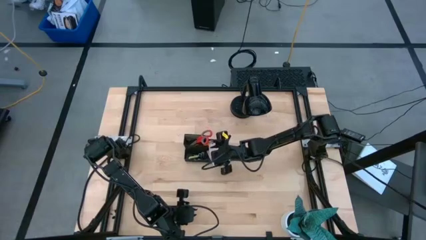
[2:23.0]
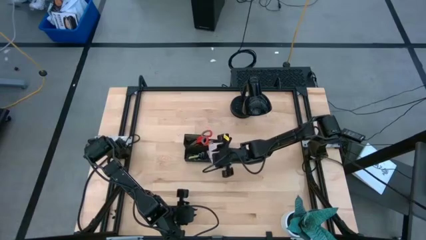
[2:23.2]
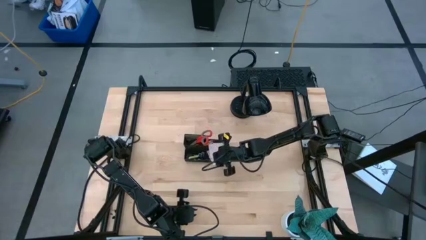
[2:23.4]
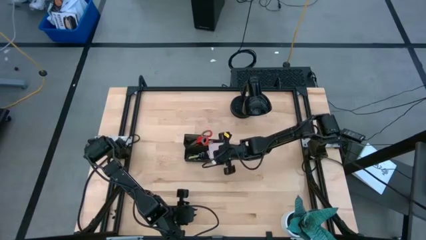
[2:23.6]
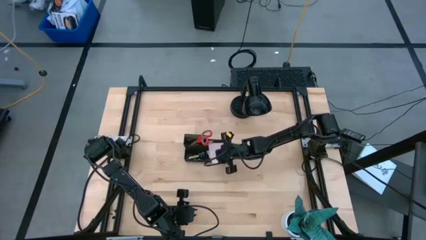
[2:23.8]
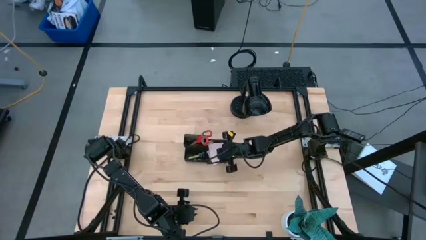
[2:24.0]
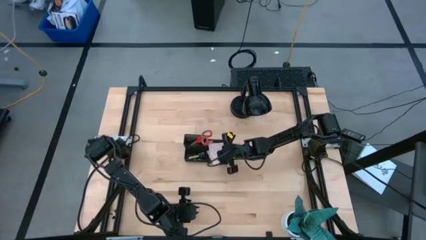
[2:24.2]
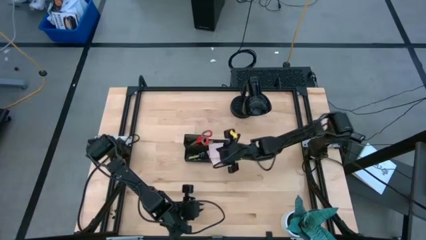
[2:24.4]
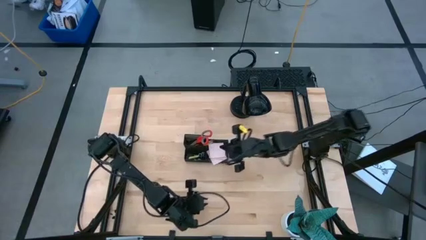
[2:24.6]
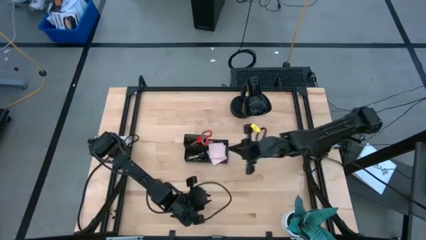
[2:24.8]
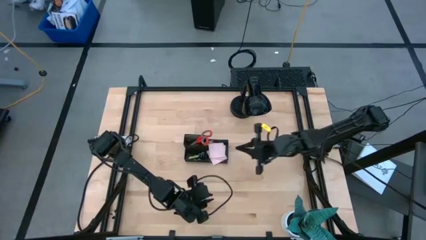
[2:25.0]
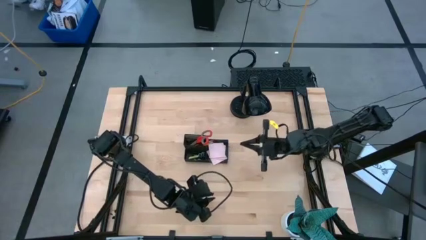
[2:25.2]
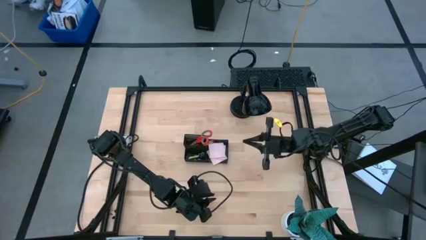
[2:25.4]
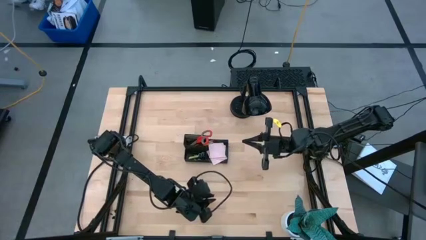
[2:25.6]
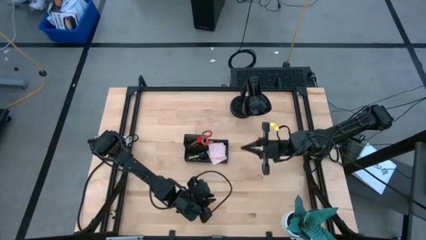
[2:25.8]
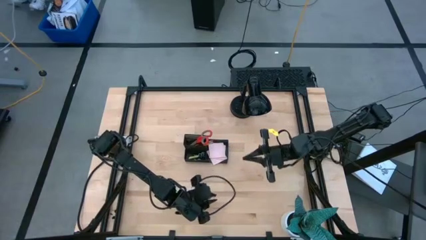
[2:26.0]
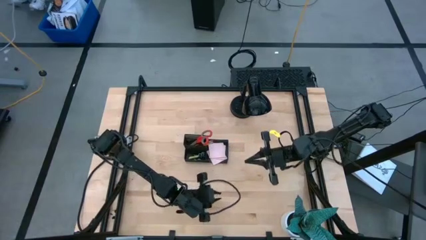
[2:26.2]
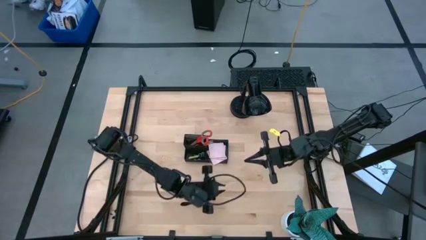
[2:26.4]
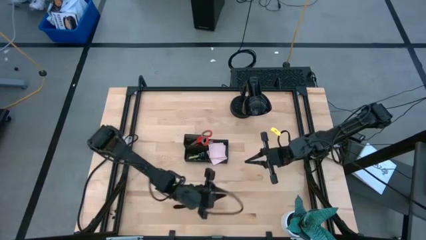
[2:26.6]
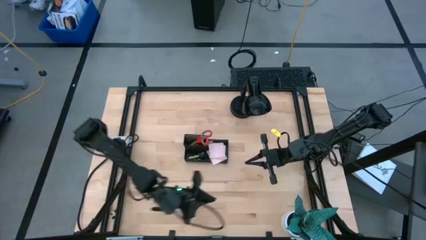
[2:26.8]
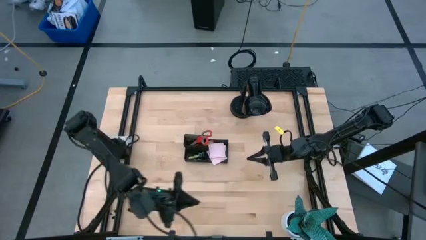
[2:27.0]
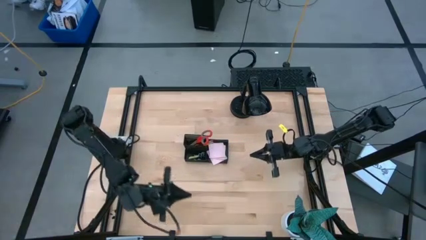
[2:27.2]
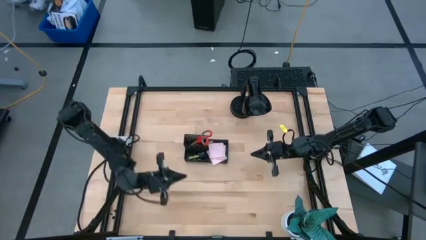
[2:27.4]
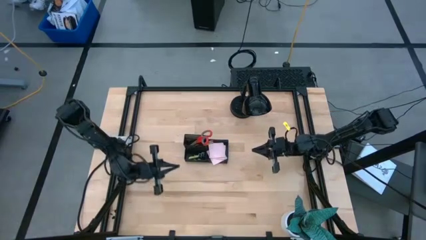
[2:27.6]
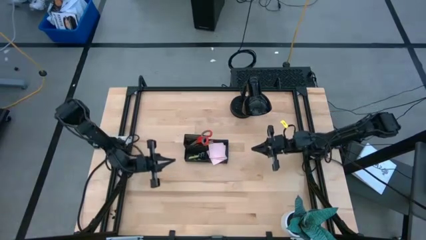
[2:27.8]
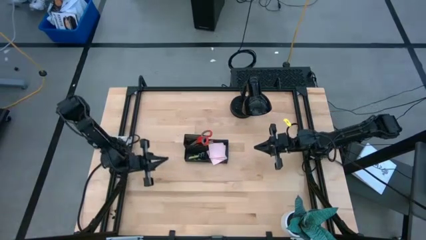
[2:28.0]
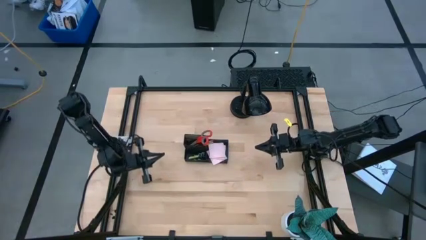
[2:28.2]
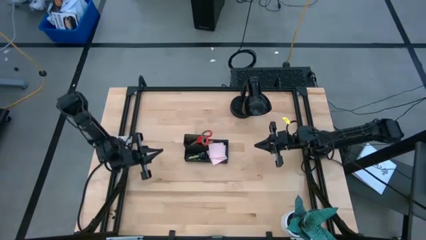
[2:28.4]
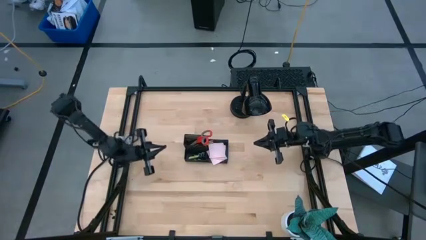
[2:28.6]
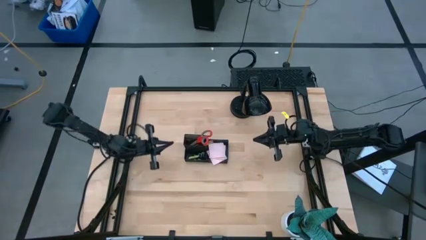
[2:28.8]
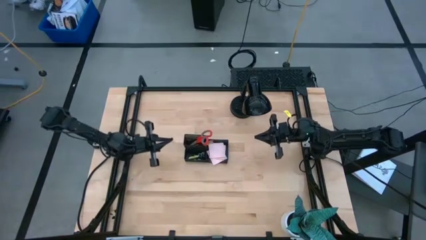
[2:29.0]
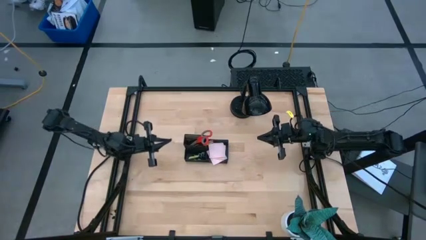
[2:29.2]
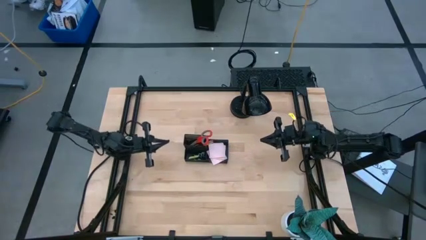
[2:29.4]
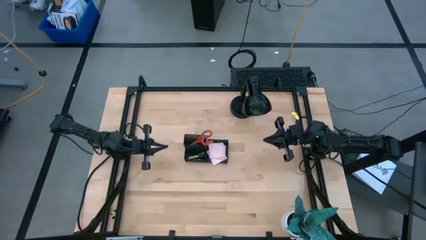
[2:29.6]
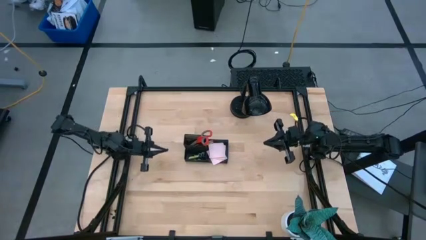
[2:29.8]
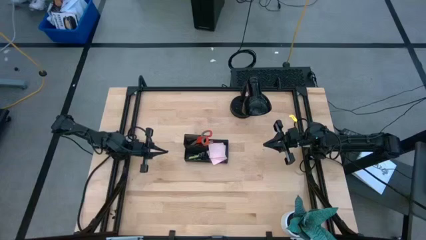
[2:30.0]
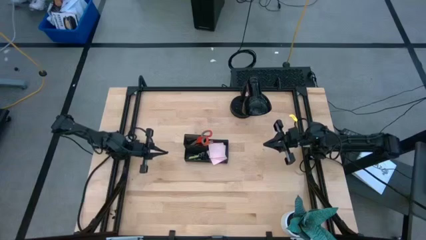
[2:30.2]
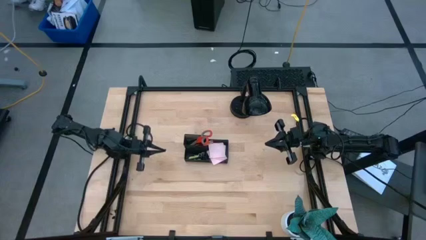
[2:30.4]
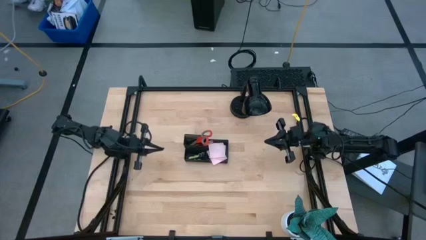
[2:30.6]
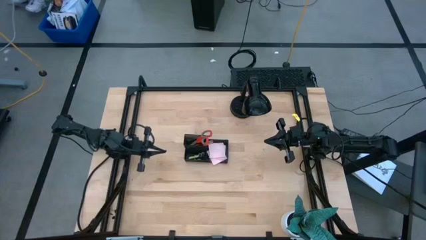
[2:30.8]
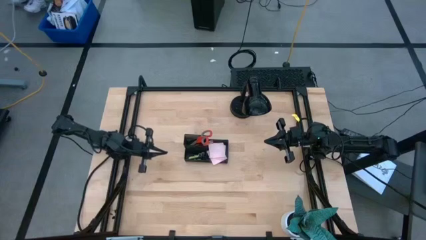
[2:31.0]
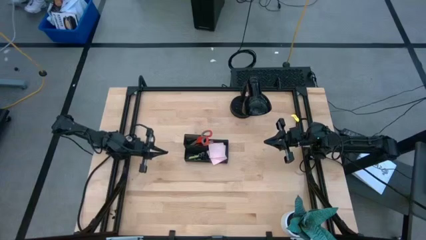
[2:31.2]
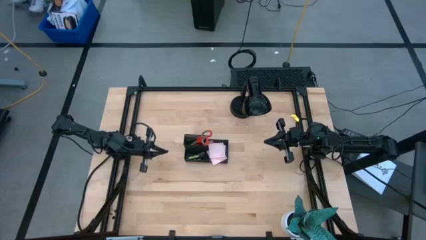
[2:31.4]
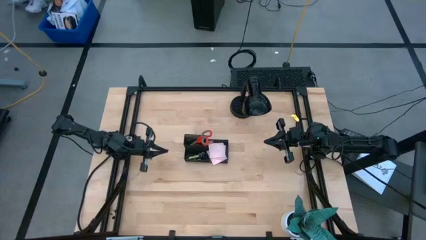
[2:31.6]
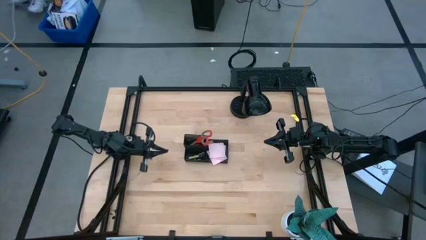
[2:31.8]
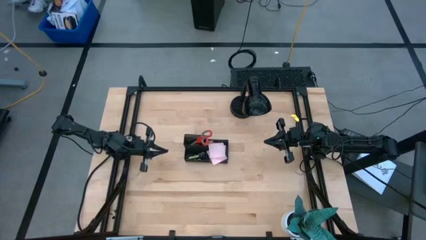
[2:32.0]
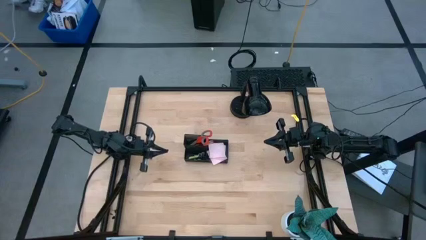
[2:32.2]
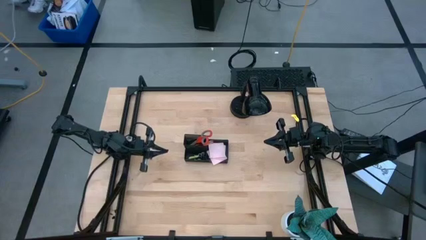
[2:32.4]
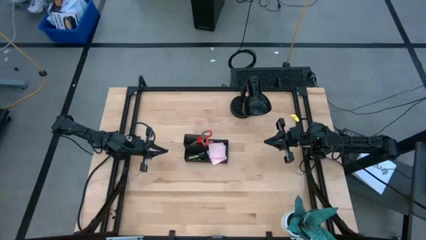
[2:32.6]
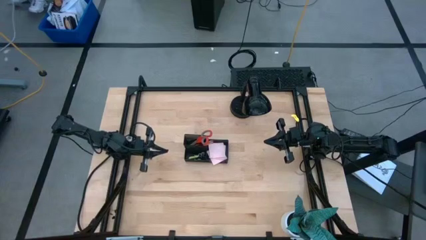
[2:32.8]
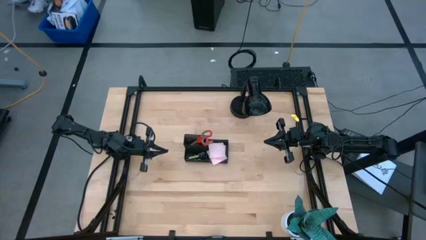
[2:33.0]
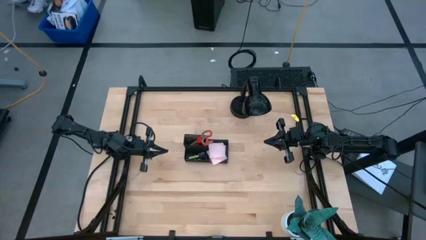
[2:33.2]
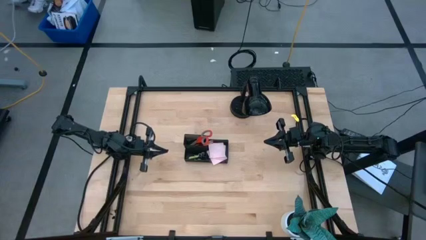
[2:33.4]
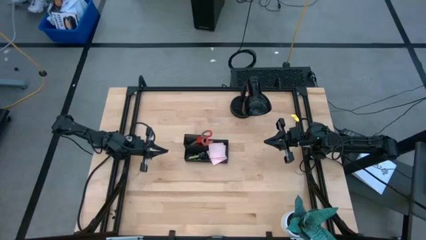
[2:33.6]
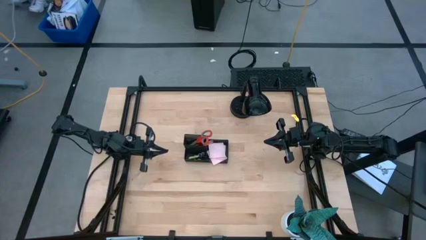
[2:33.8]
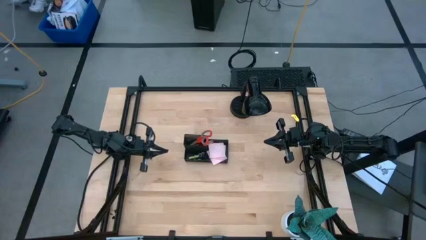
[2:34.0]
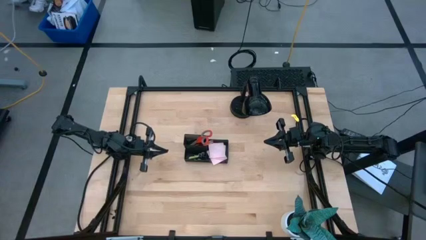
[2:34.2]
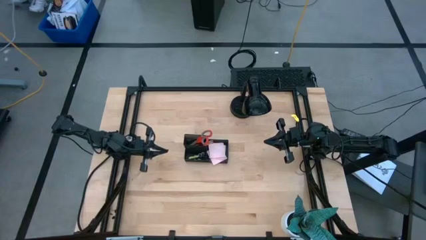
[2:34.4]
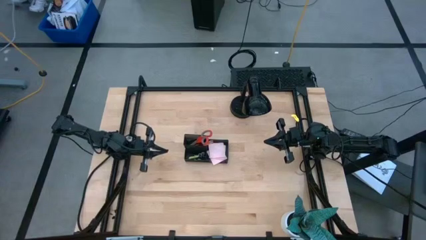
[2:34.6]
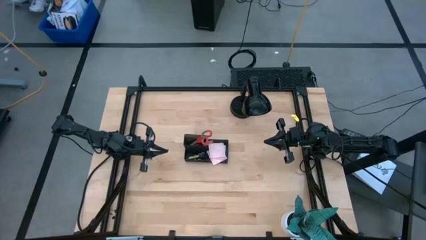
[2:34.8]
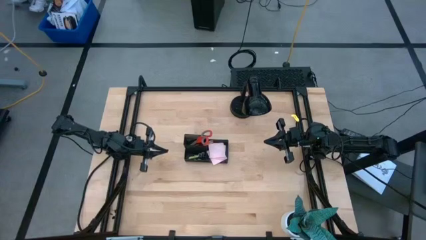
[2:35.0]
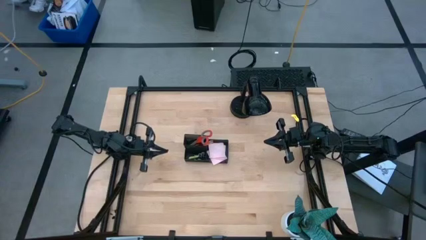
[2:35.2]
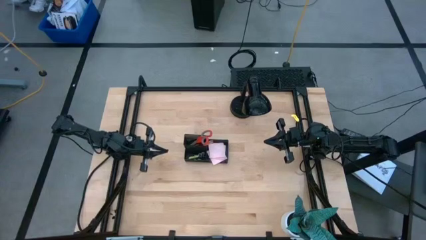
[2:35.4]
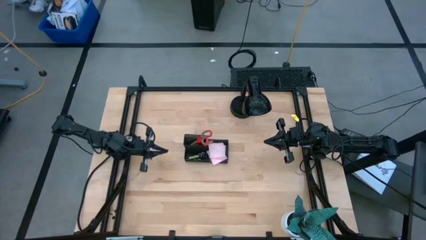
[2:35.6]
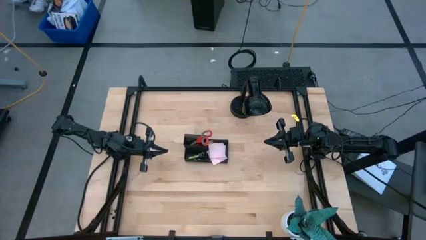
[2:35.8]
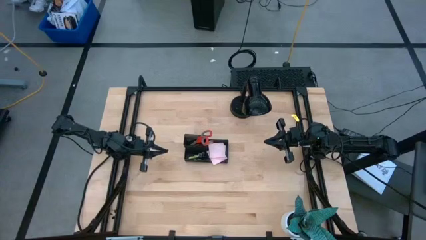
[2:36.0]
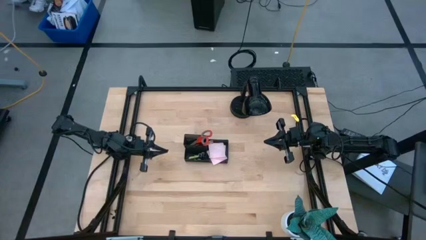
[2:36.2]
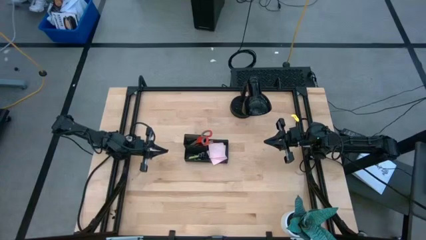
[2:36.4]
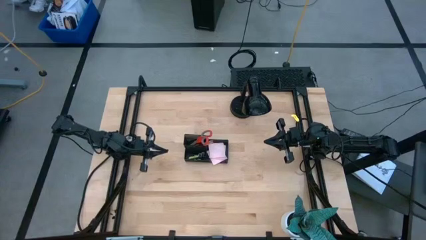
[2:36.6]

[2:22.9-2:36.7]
Task: Pick and place office supplies into organizer
Return to Home Position

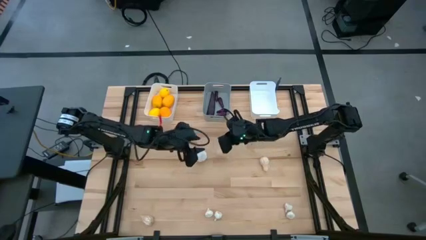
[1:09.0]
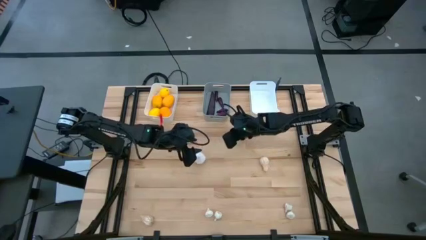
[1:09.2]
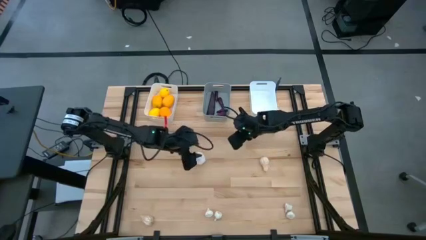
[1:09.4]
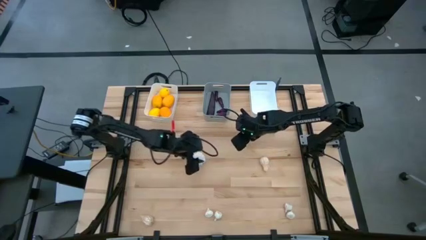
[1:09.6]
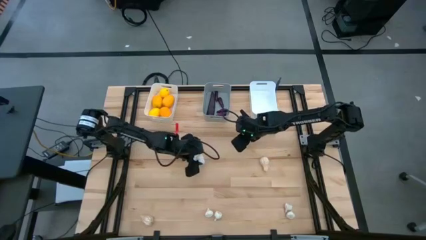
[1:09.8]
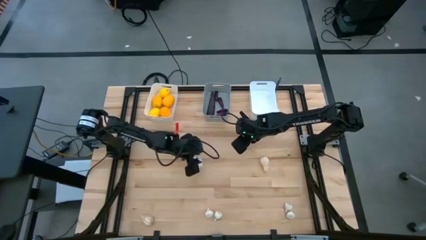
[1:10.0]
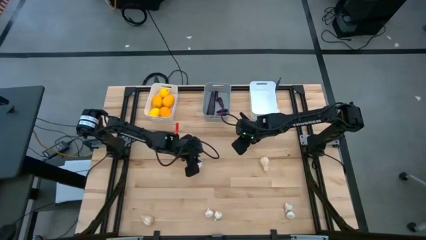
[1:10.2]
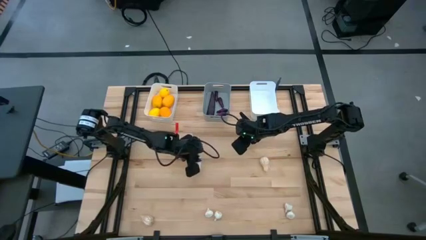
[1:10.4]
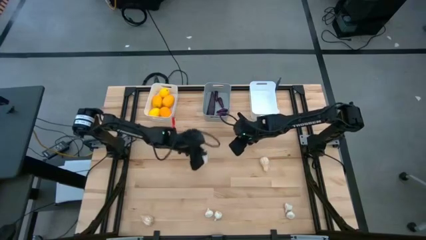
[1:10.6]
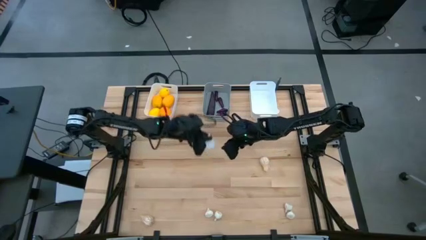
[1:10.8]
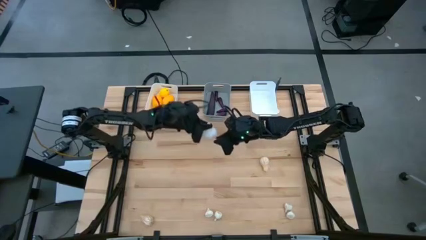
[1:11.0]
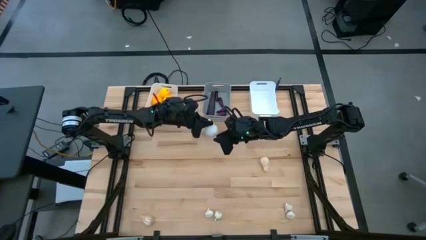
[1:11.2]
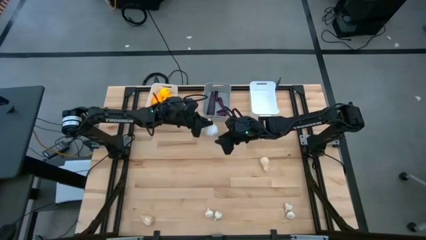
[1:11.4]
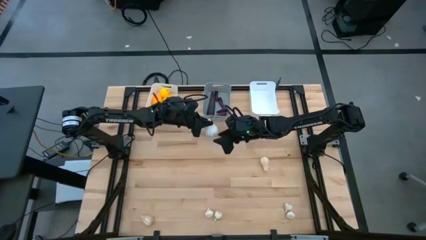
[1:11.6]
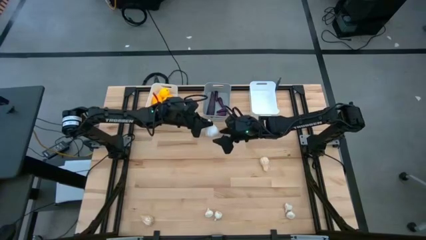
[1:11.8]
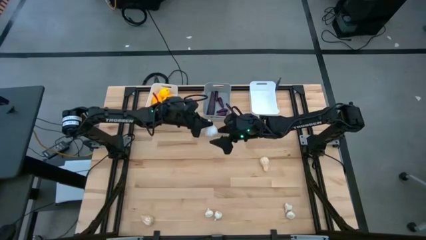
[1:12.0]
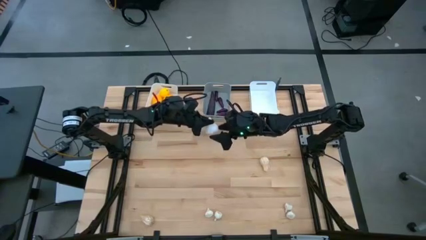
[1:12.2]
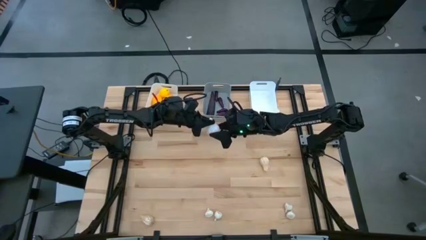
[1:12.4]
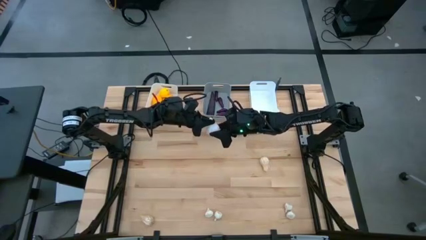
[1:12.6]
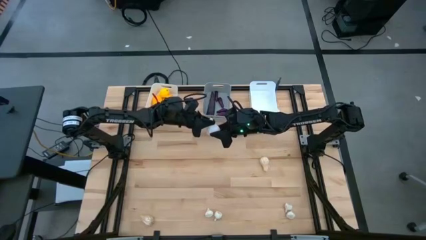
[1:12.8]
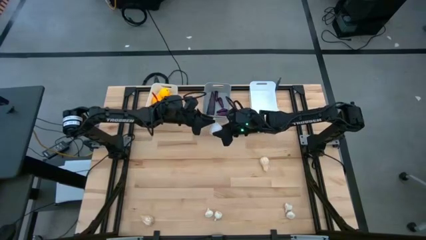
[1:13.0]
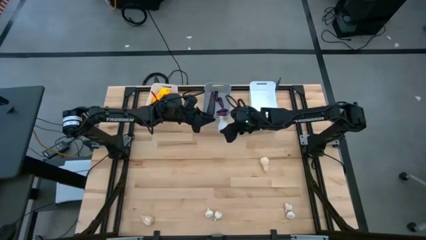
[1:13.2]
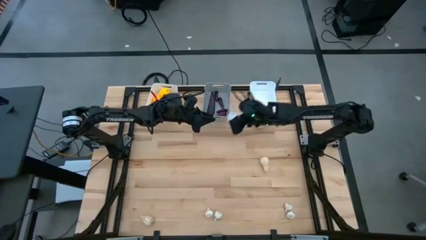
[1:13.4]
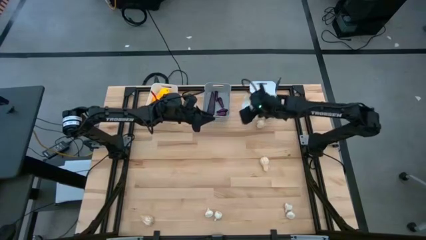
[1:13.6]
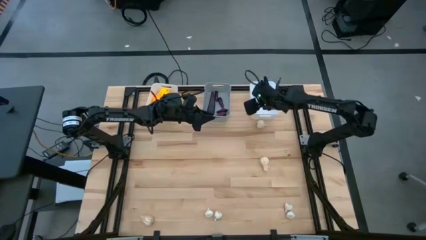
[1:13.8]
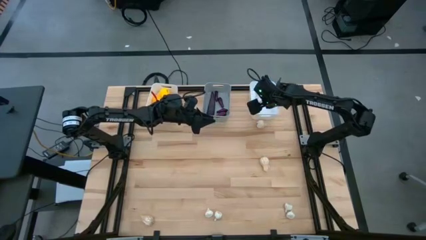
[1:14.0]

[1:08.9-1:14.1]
Task: Sort produce into baskets
Put the garlic into the right white bin
